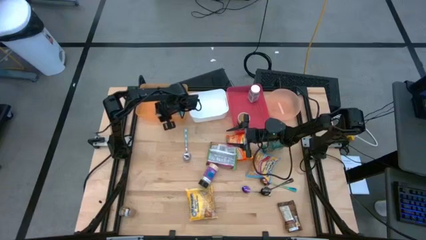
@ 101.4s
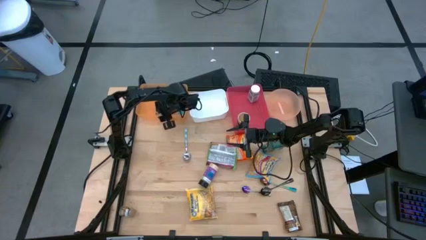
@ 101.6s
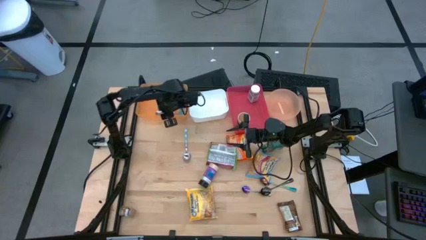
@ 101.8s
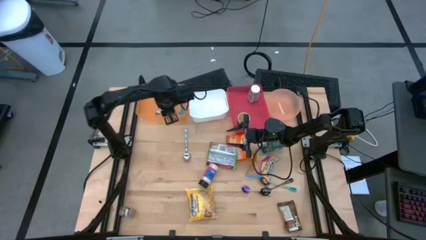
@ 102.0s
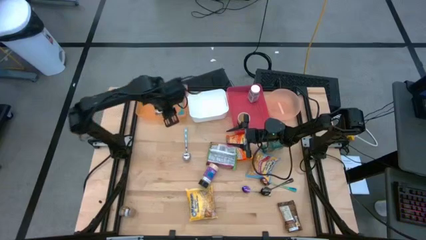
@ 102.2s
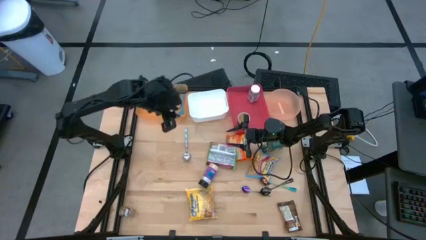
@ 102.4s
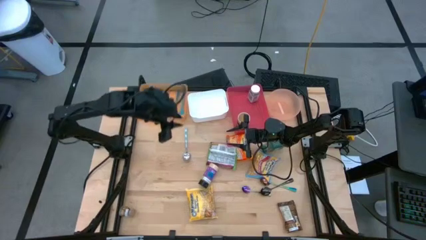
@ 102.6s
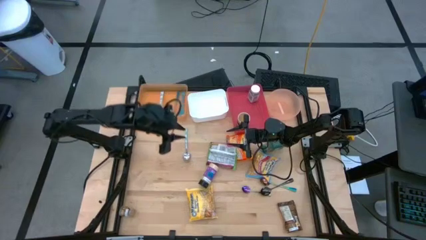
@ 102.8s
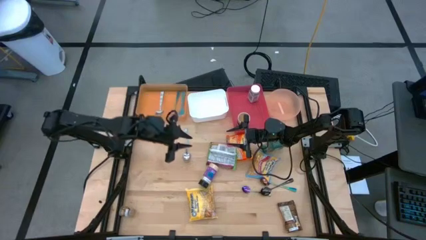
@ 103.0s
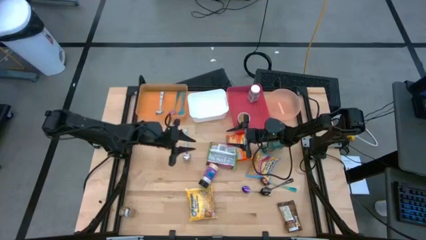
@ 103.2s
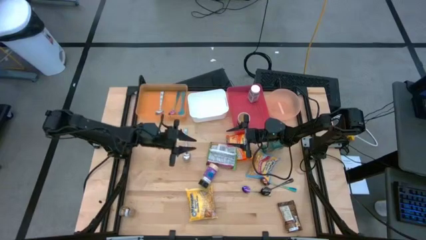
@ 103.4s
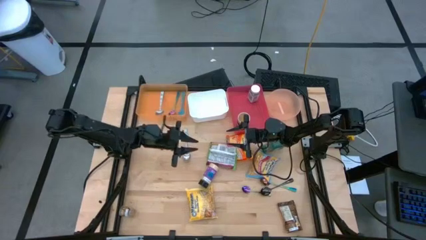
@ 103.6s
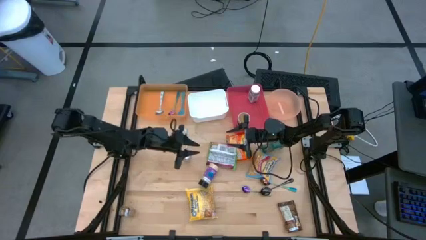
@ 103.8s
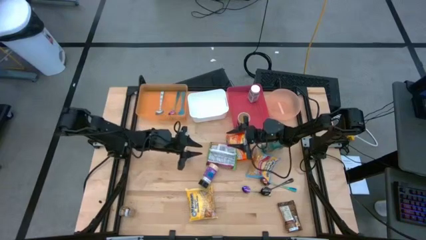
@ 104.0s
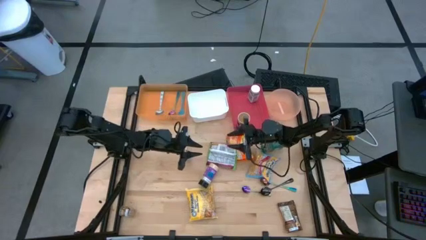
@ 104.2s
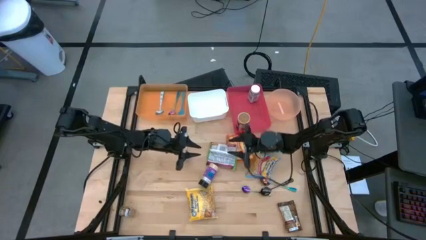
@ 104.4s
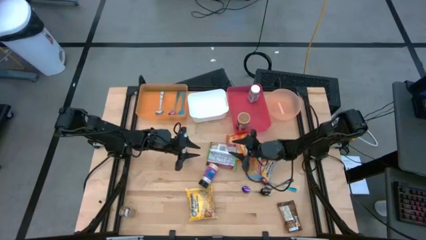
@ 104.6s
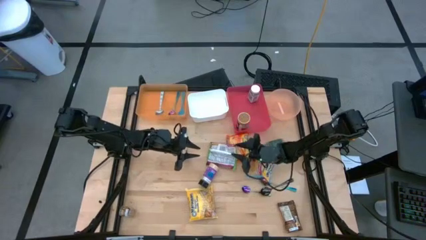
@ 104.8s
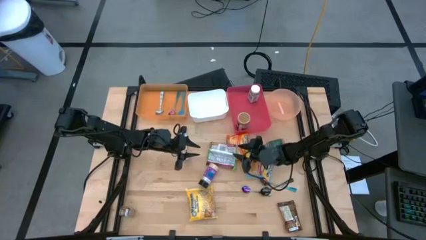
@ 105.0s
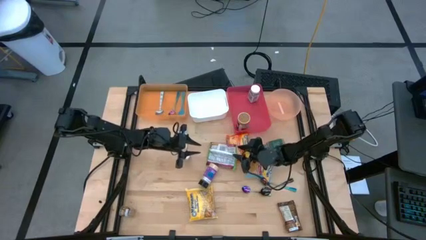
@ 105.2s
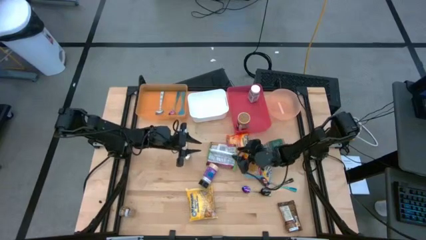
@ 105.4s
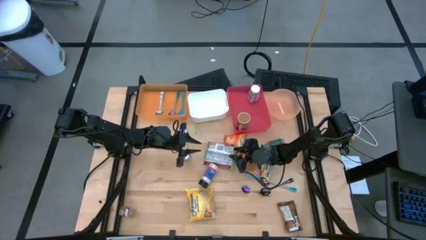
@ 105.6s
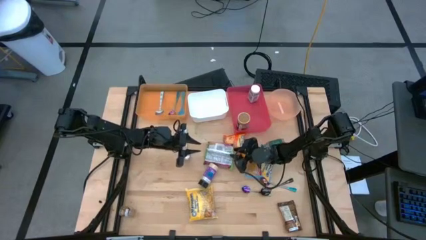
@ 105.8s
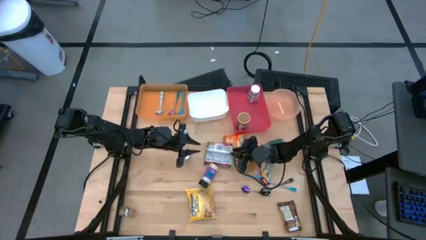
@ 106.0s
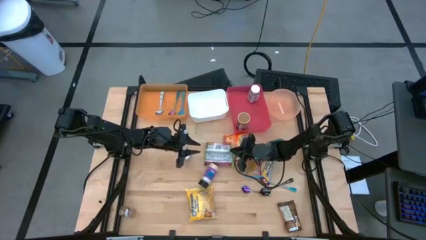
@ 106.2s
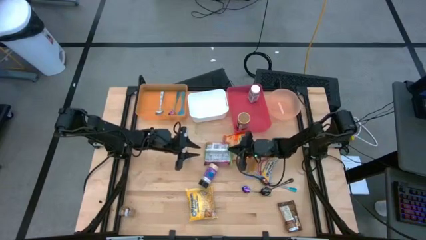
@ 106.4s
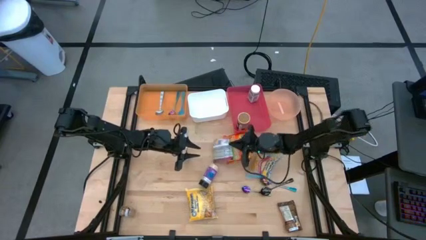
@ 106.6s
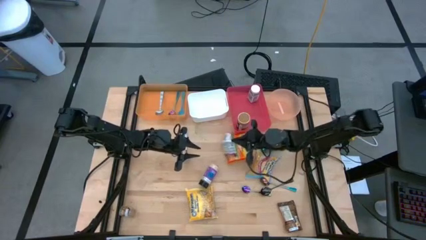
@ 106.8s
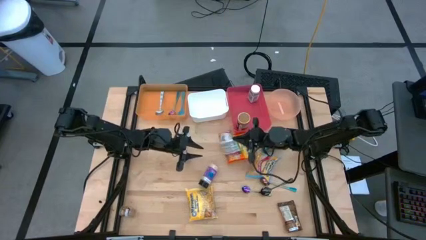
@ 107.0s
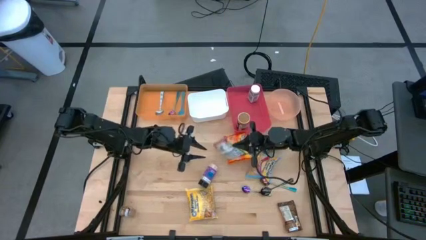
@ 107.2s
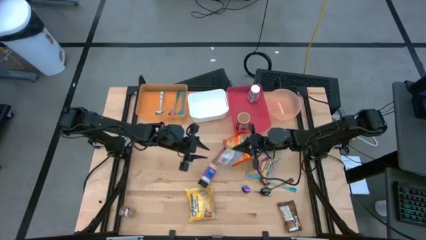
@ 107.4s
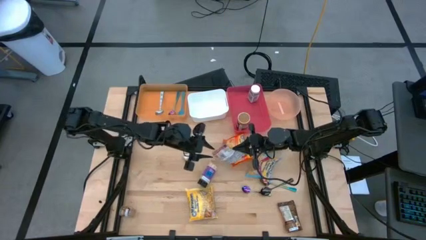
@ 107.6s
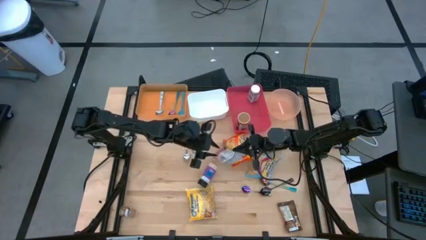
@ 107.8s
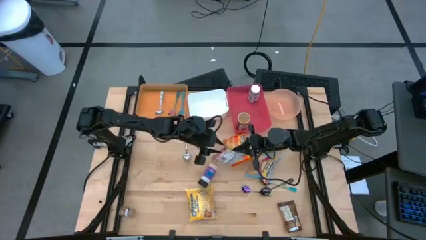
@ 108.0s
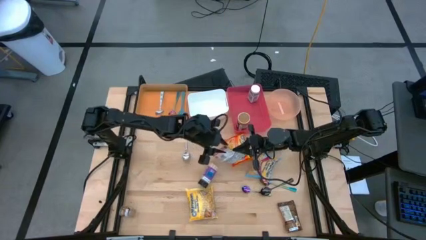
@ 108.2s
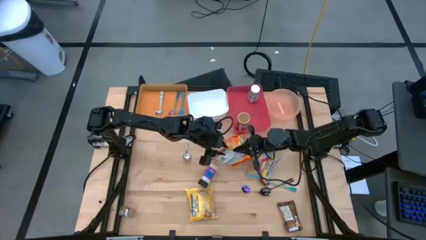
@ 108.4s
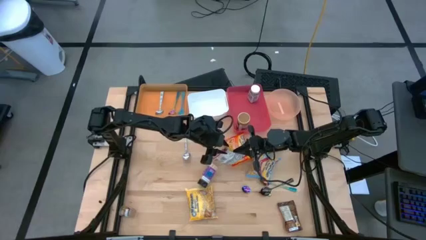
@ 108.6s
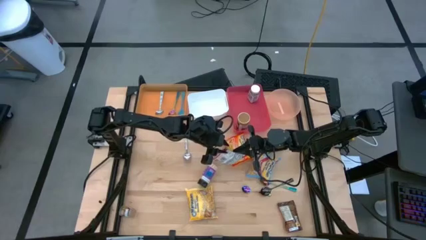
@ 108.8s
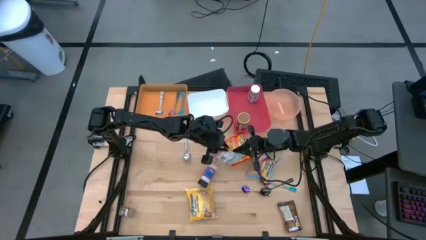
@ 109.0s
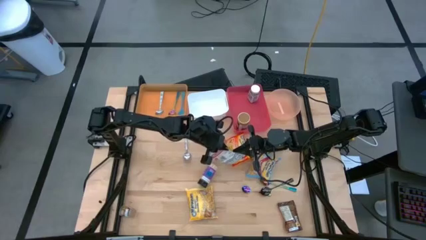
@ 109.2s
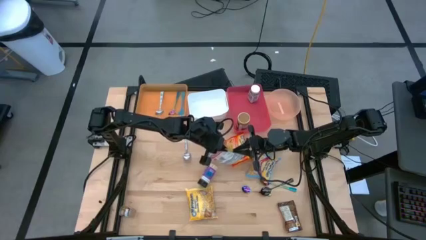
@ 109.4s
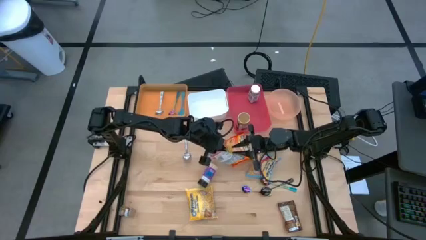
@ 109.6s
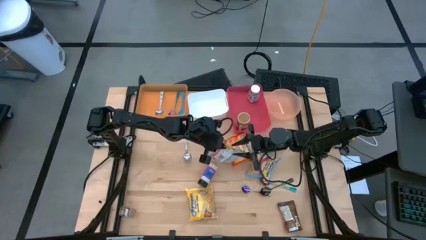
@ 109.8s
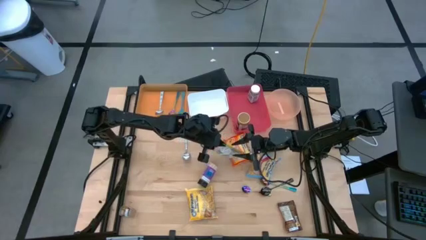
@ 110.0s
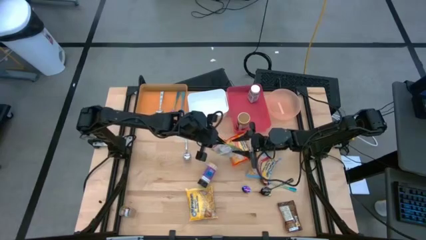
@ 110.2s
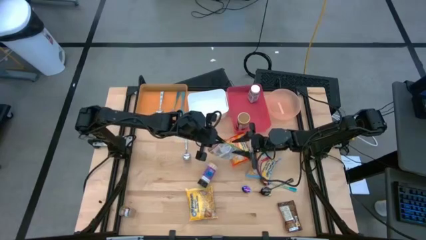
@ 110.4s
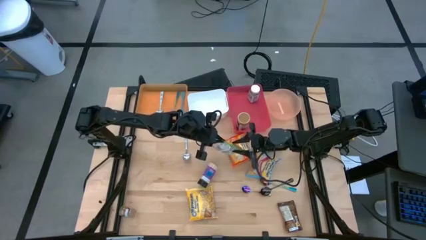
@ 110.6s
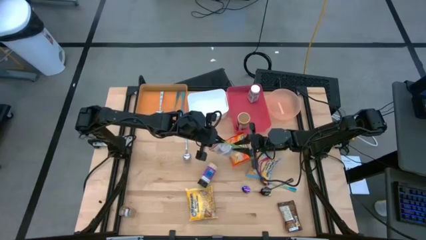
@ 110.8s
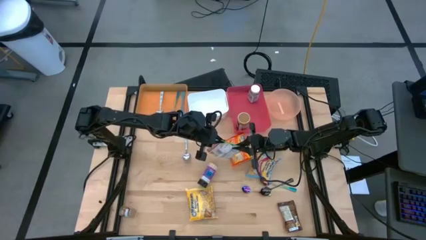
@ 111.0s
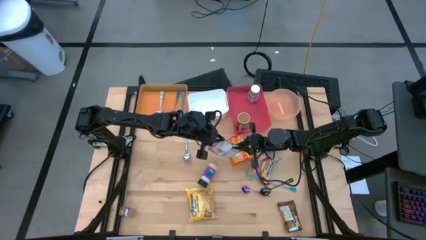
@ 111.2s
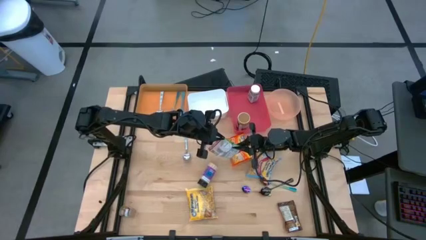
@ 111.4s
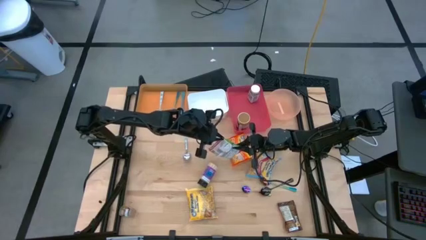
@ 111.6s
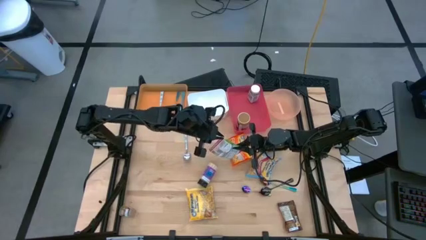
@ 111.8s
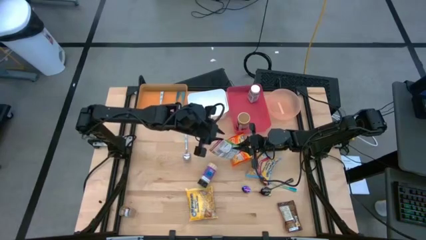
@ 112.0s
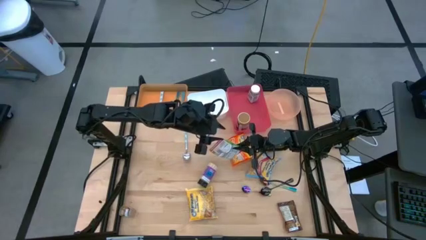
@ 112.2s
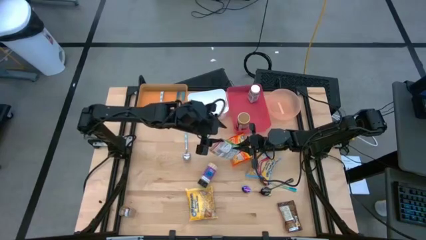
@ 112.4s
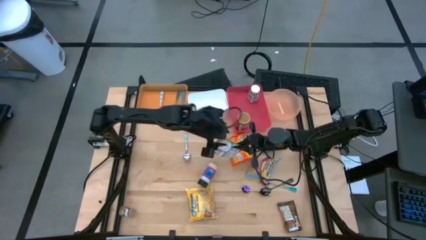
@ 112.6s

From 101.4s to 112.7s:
Task: Pick & Place Food Item
Put the green noodle pack into the white bin
